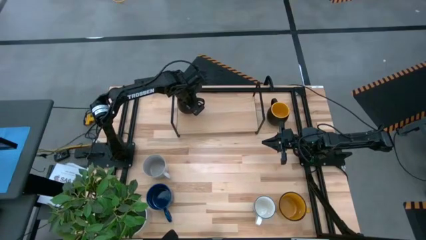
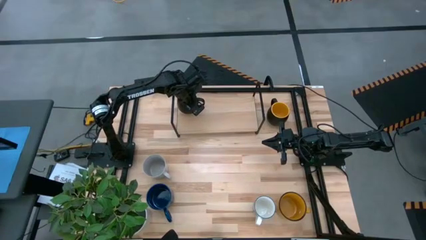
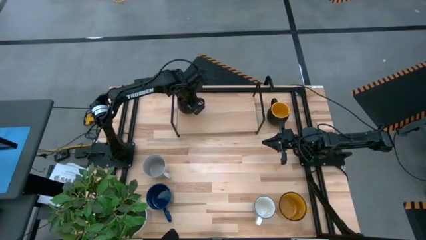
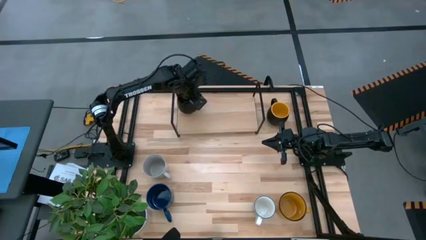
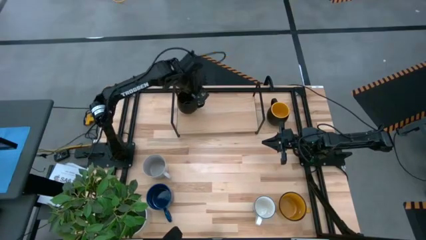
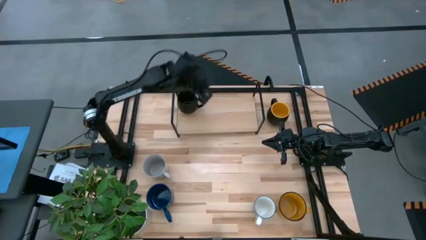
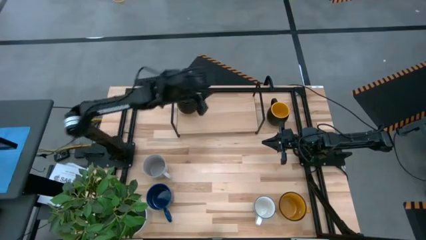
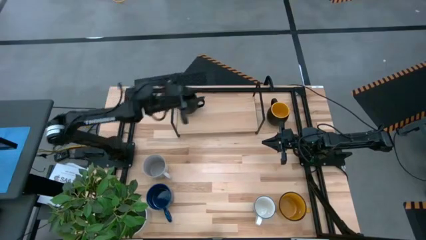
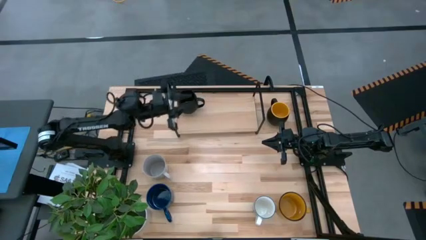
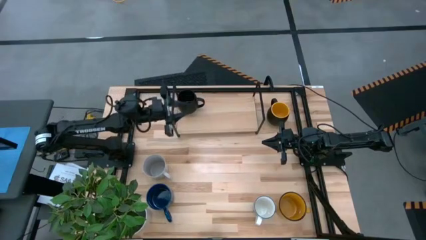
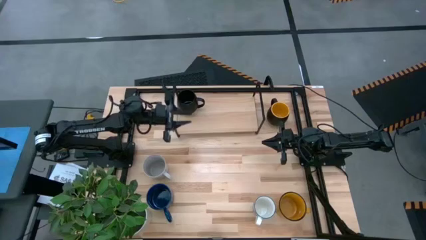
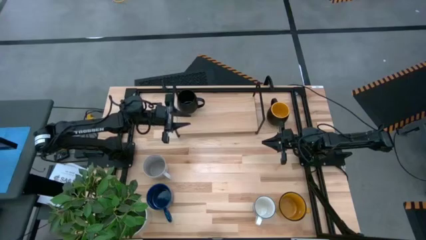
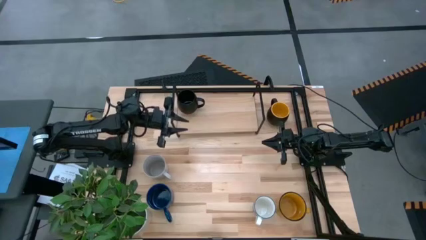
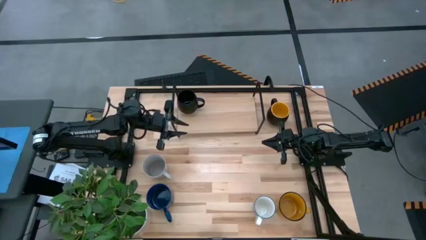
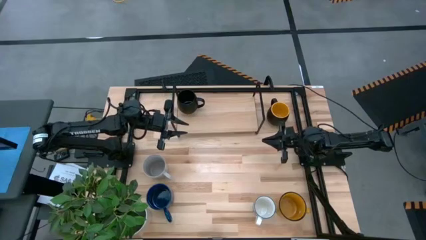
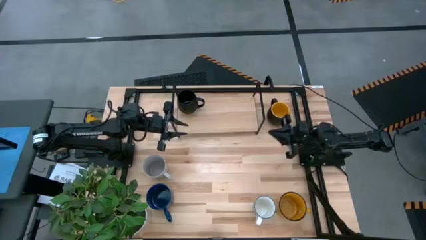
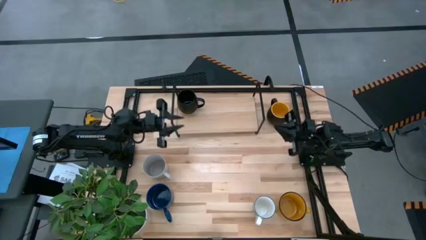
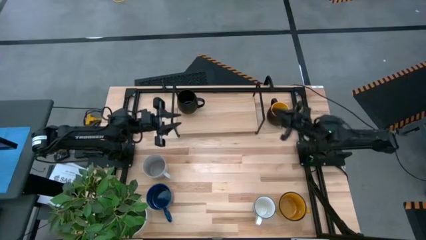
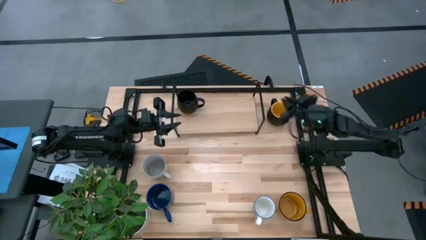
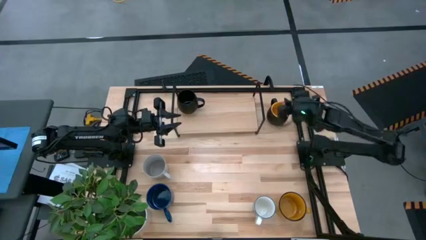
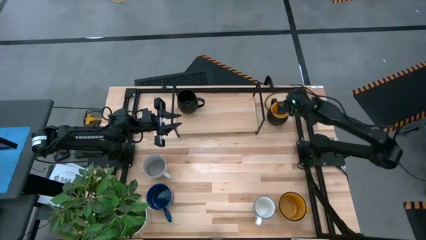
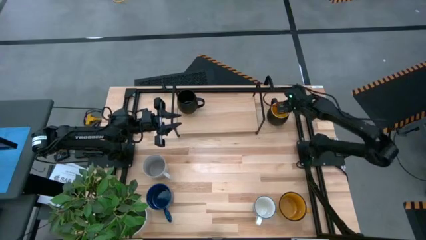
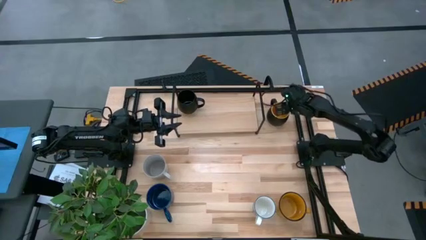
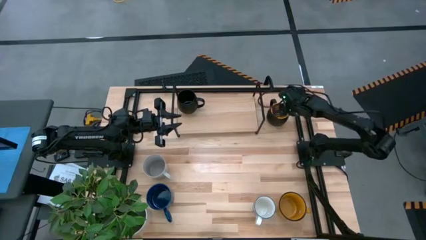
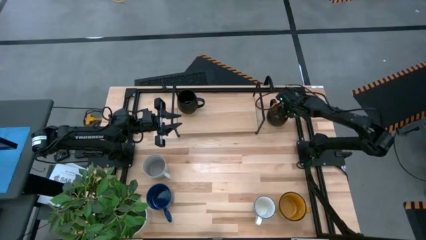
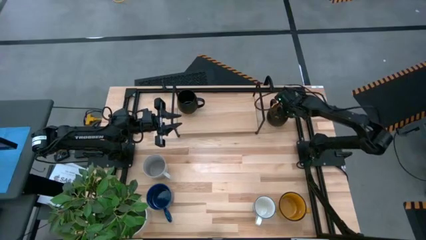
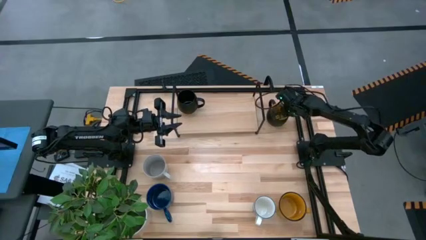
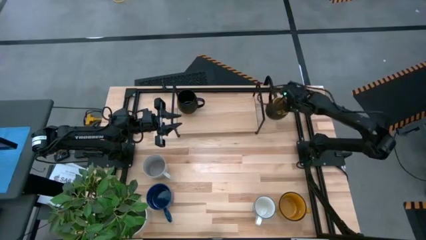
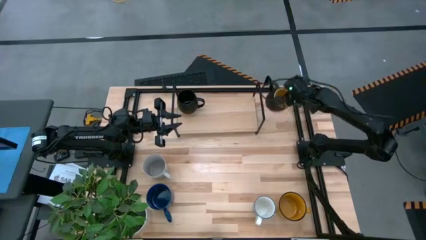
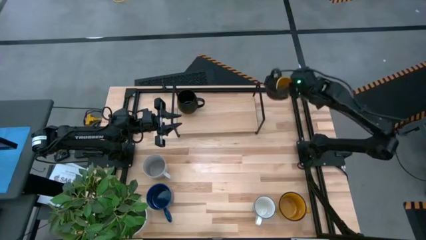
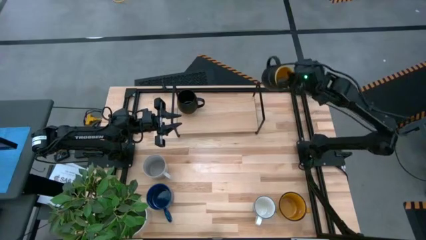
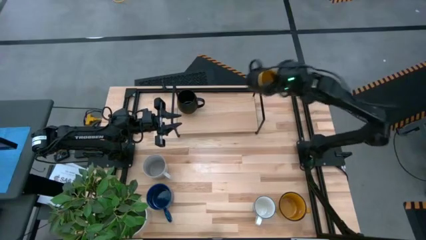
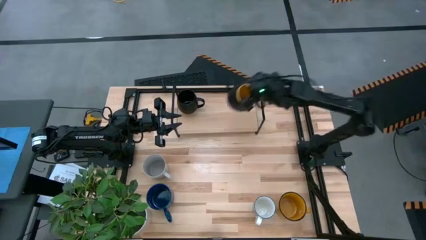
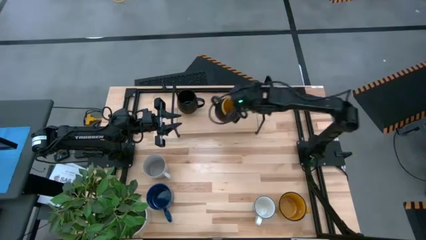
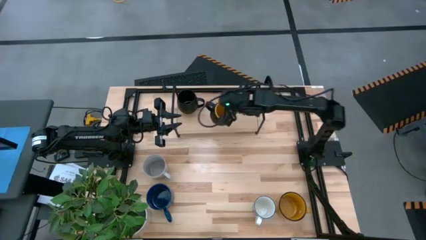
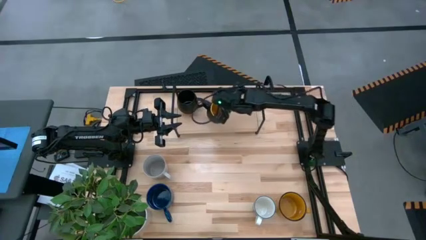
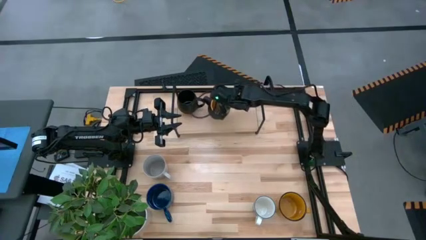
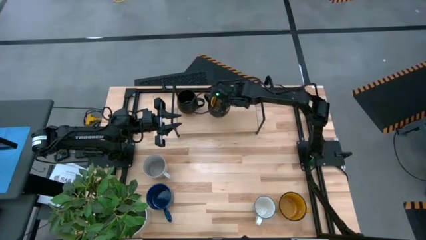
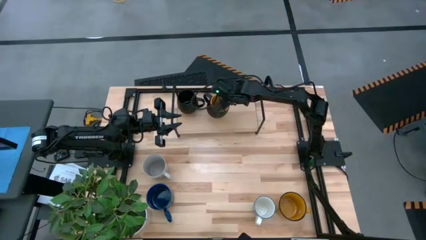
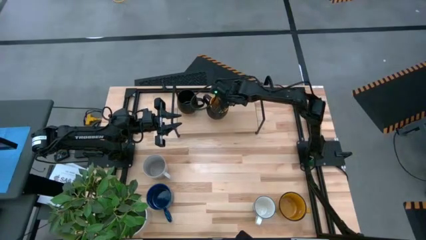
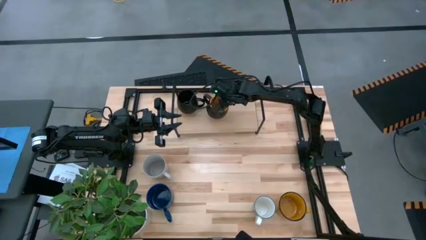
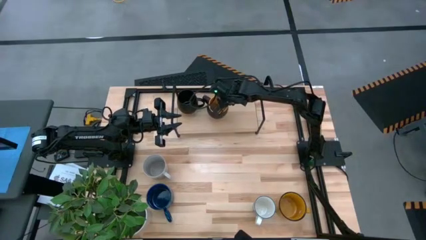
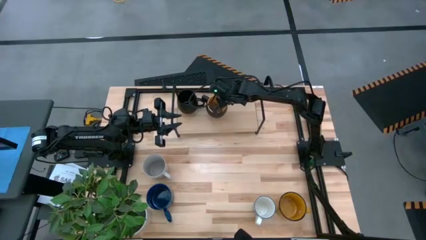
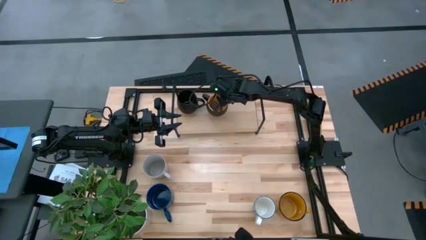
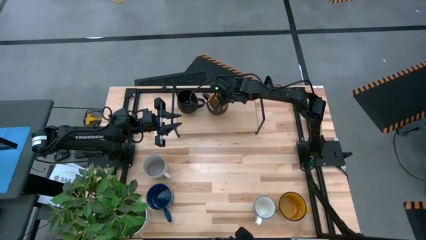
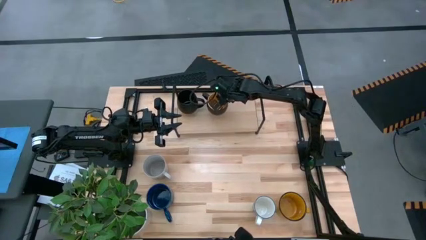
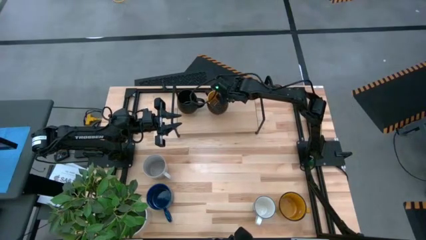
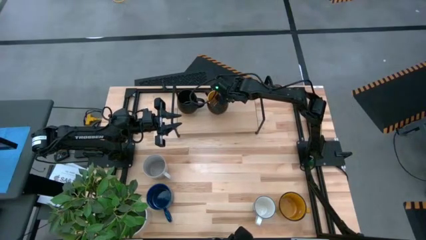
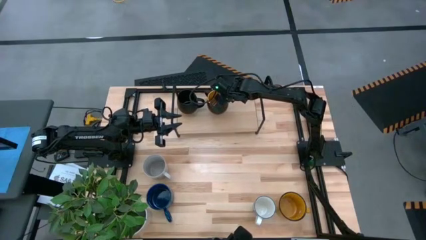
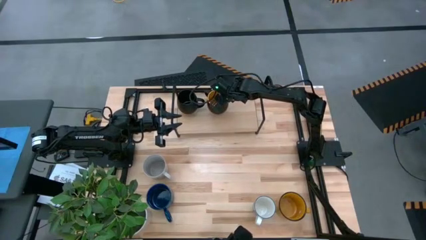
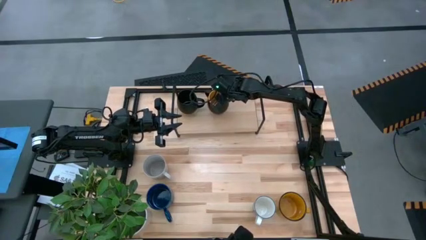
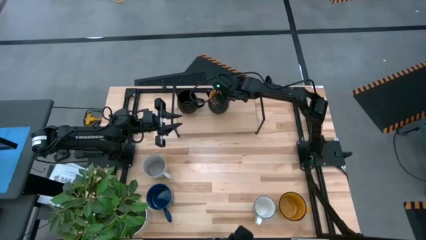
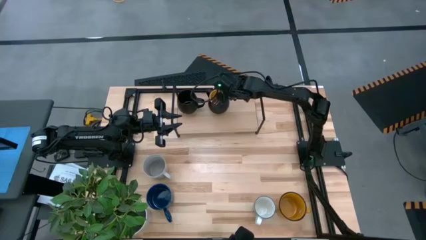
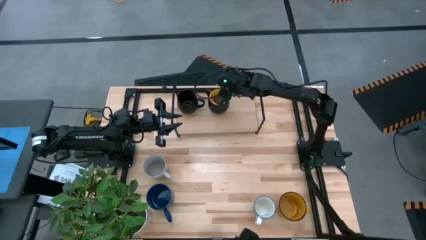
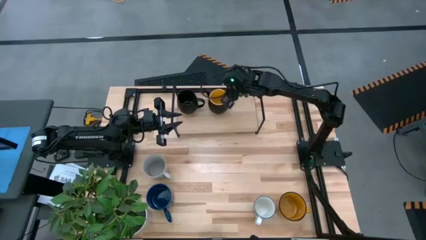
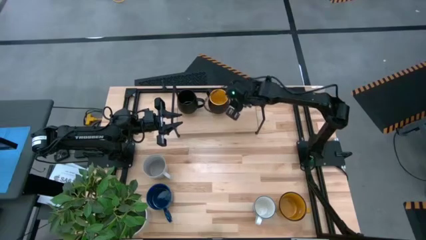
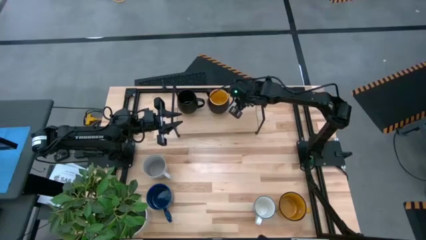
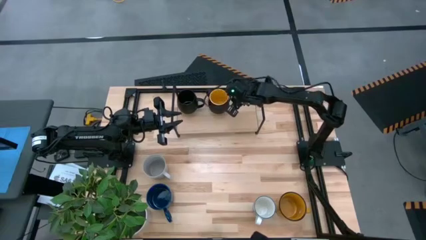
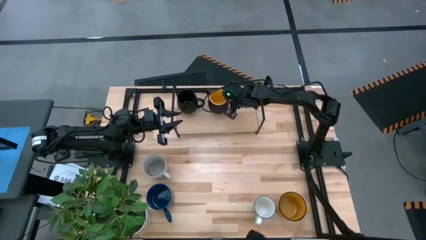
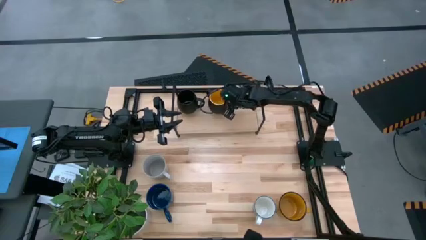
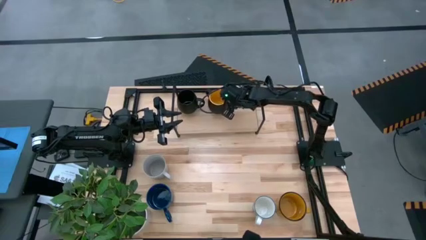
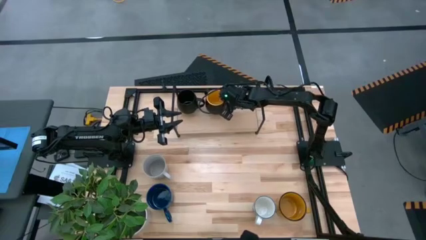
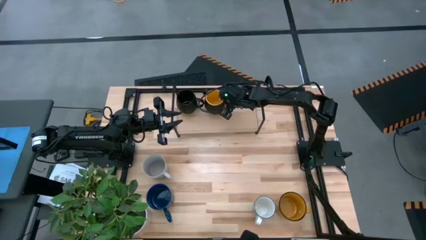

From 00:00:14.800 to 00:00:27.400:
Task: Place coffee mugs
Put the yellow black mug on the shelf

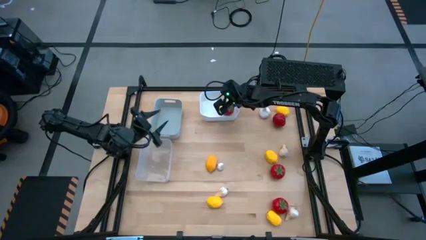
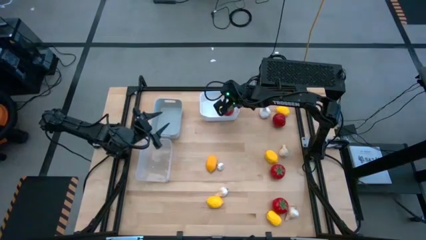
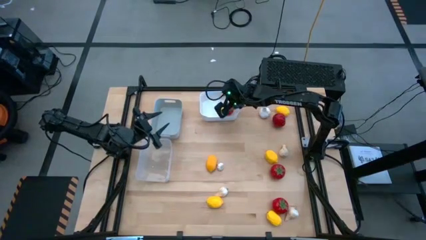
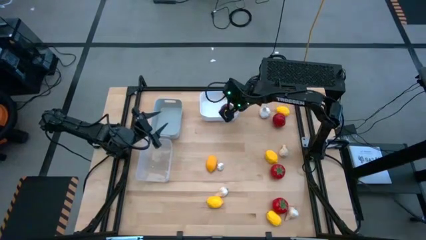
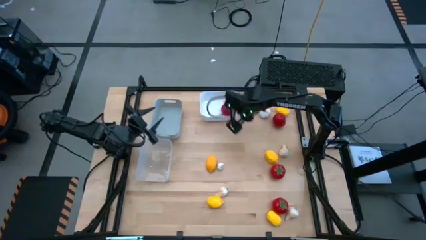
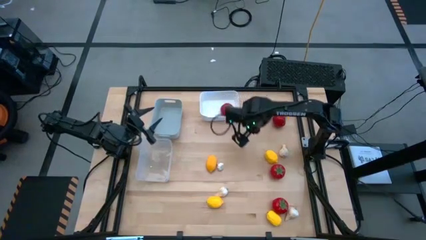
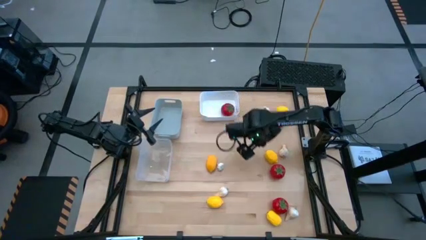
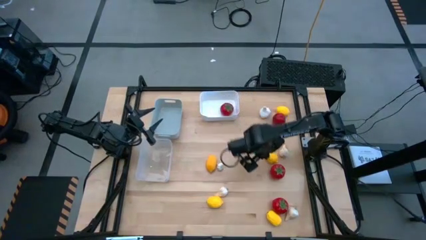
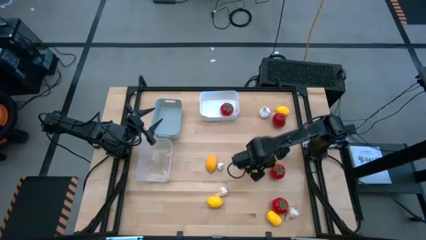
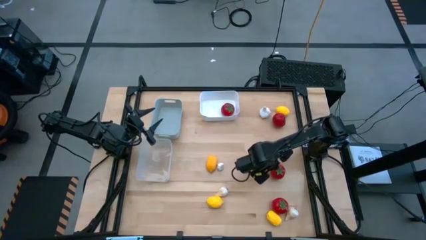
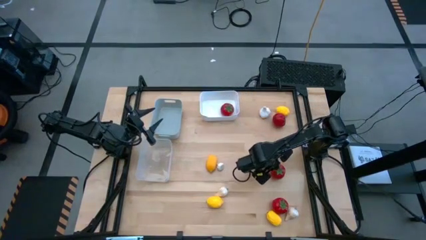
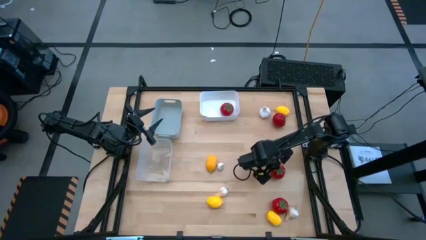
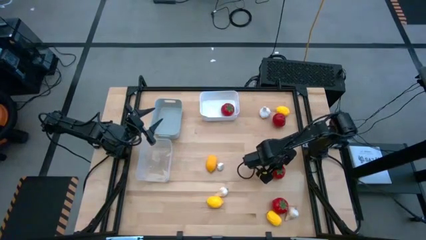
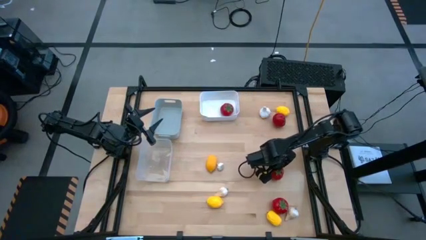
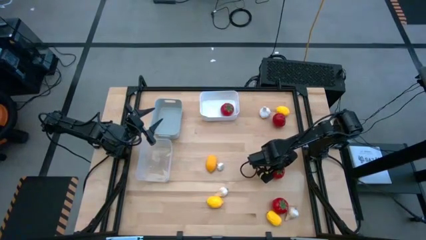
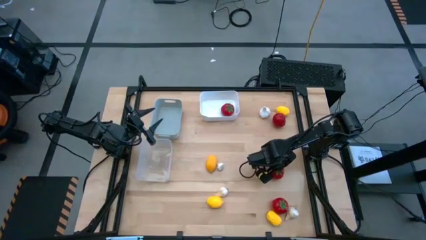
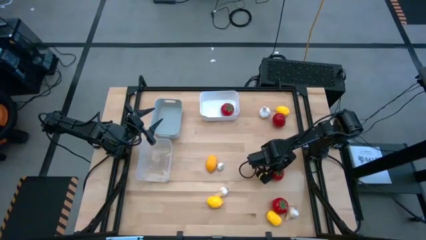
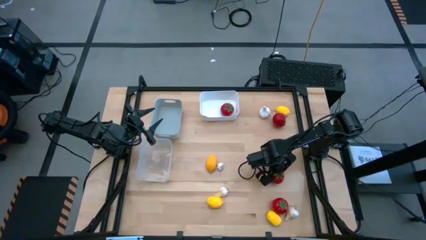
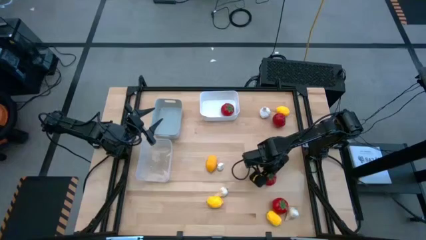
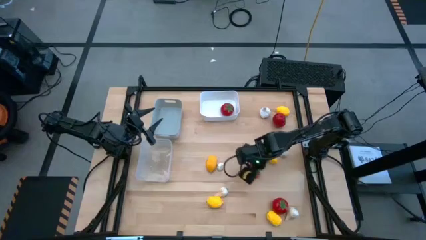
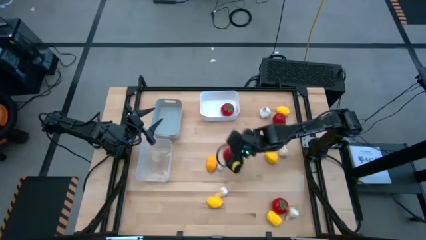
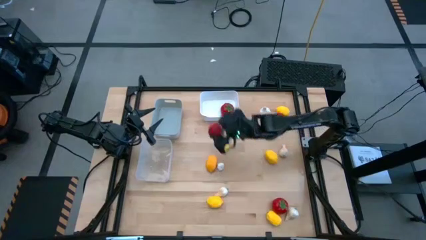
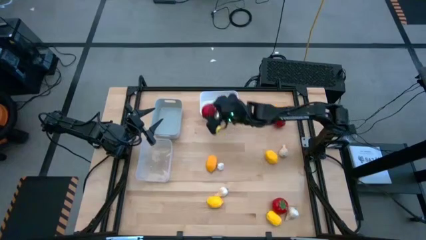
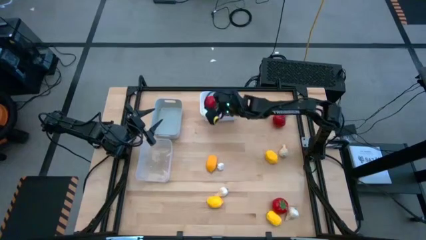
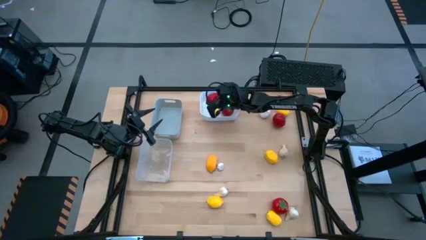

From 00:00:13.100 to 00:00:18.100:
Task: Sort produce into baskets
Put the red tomato into the white bin
